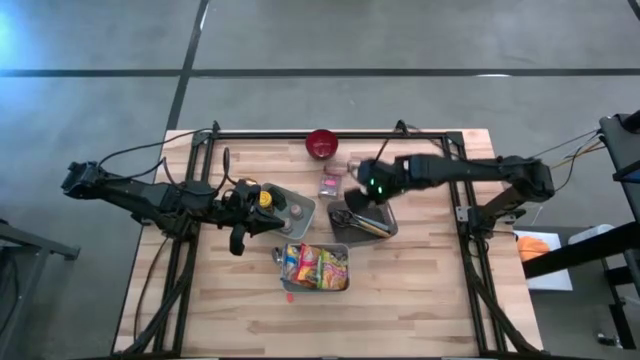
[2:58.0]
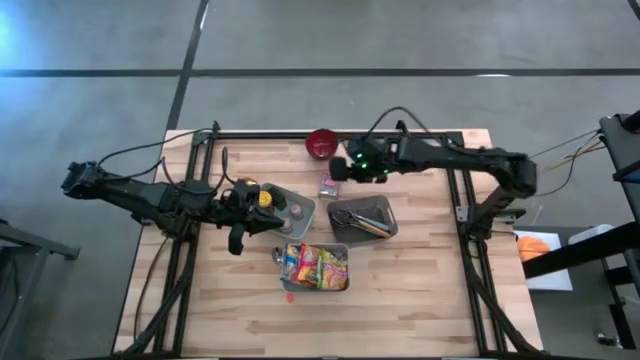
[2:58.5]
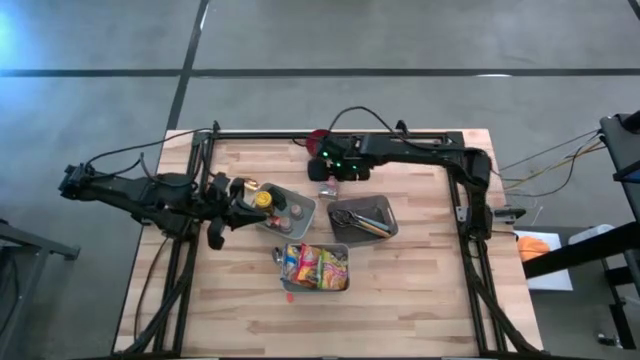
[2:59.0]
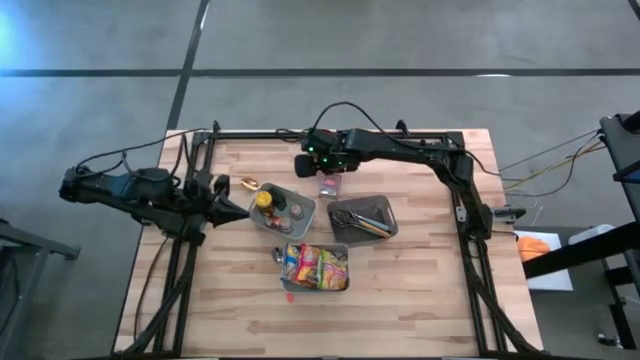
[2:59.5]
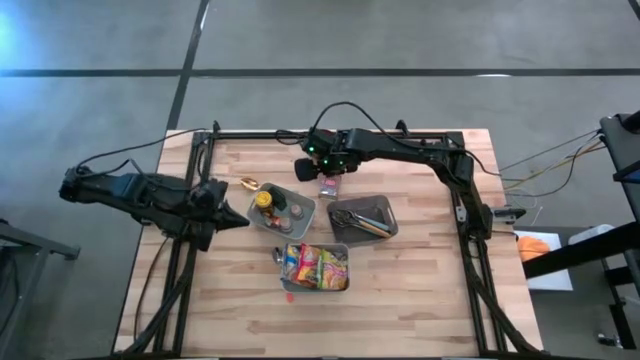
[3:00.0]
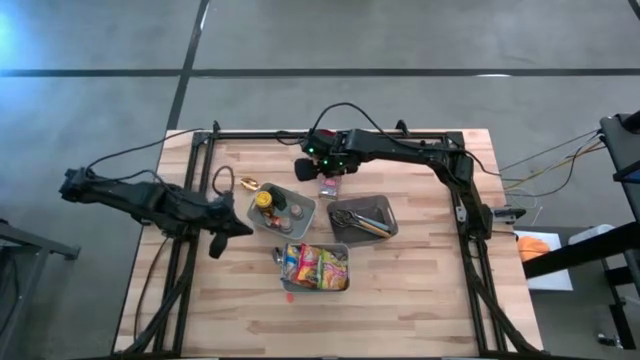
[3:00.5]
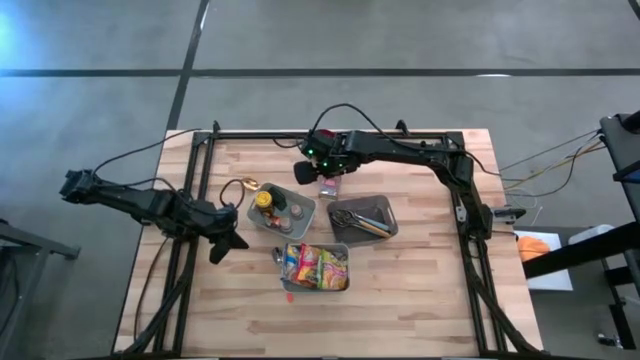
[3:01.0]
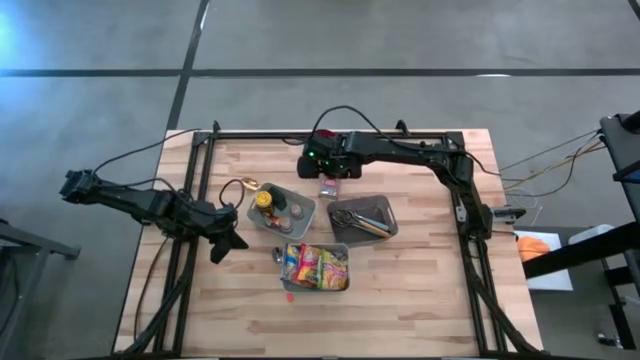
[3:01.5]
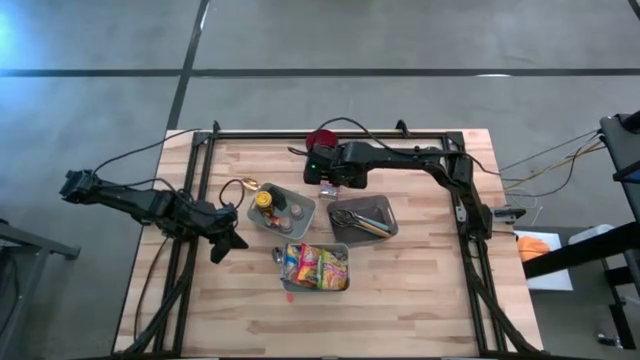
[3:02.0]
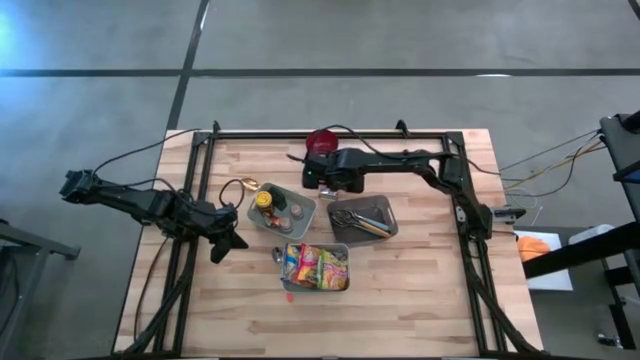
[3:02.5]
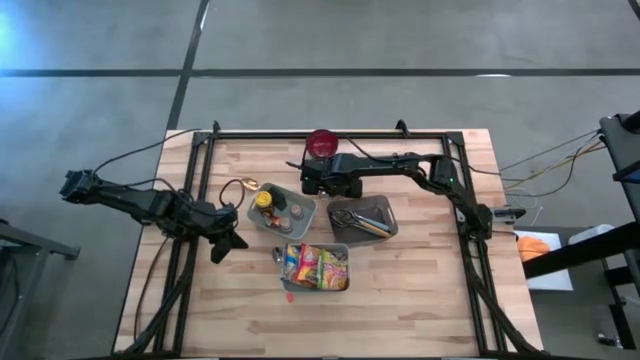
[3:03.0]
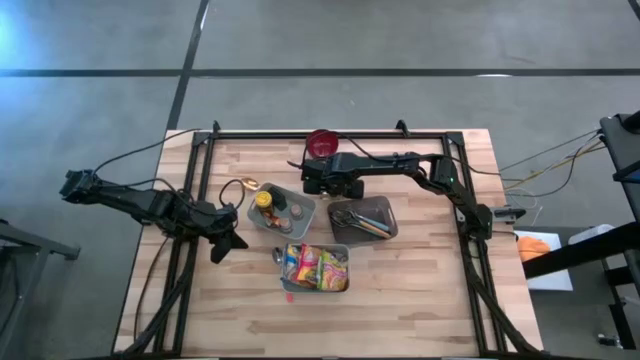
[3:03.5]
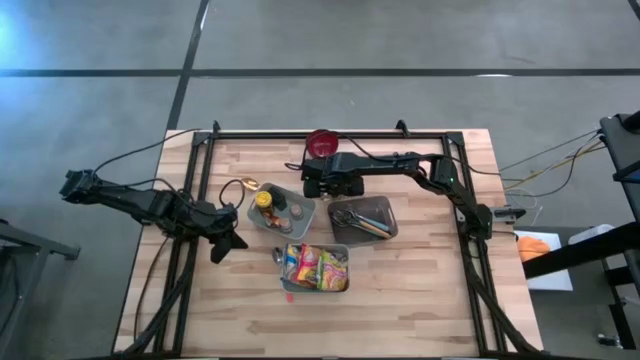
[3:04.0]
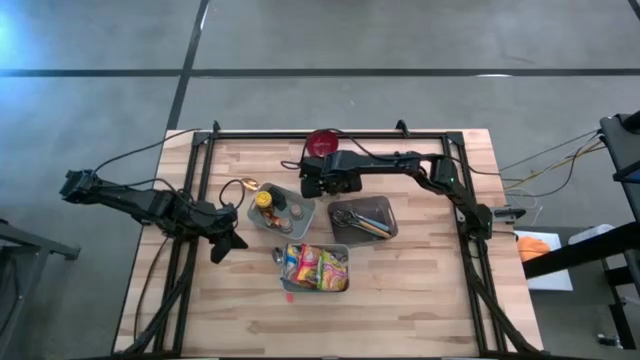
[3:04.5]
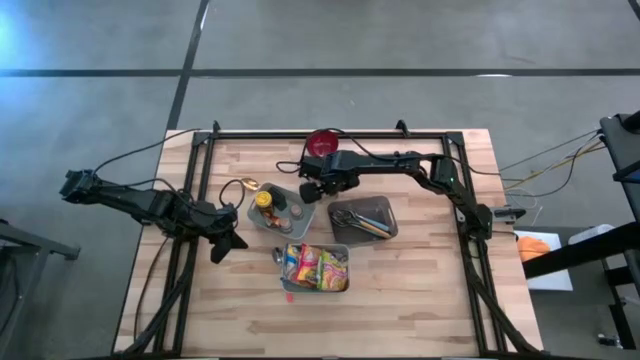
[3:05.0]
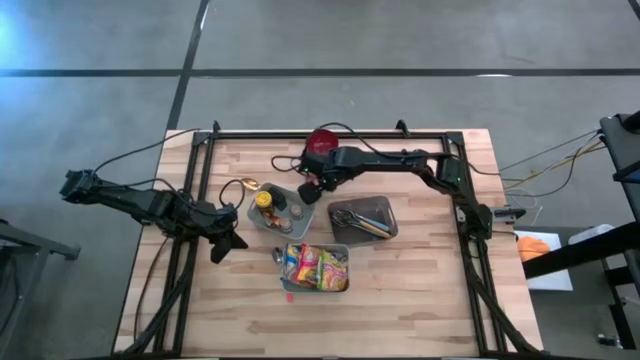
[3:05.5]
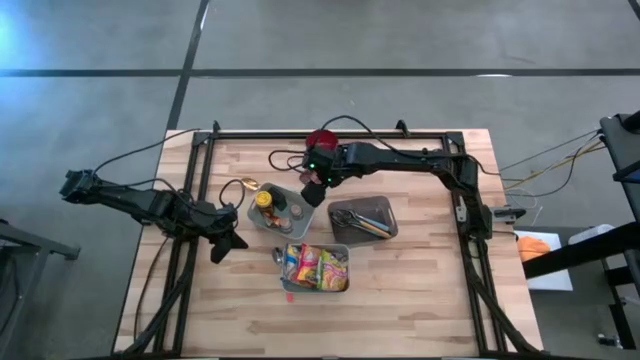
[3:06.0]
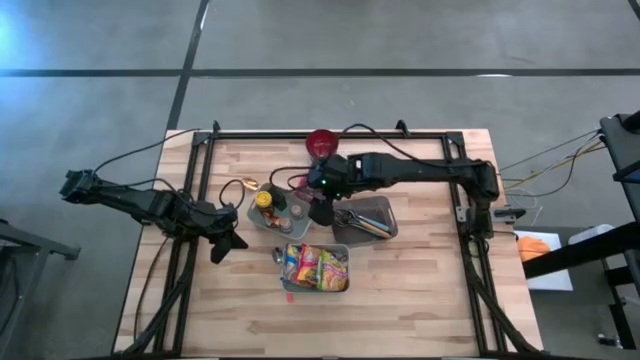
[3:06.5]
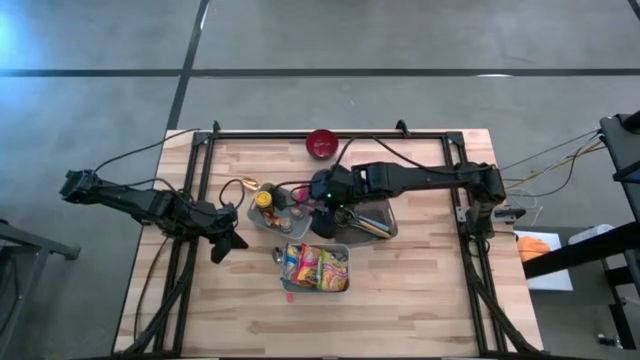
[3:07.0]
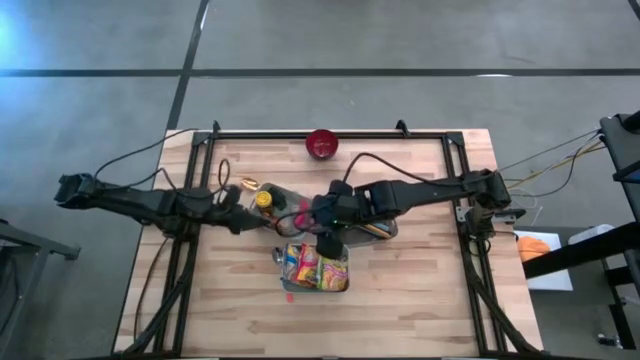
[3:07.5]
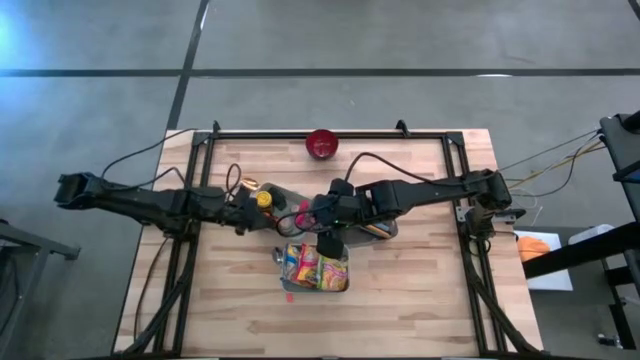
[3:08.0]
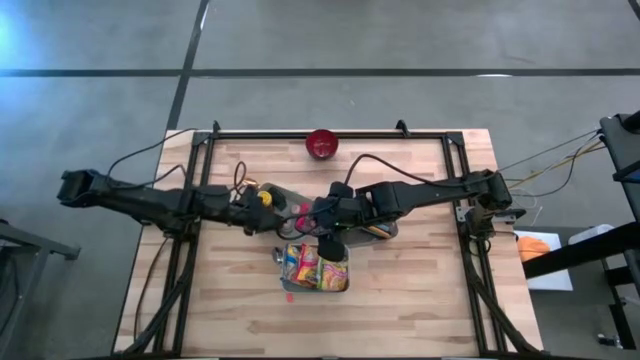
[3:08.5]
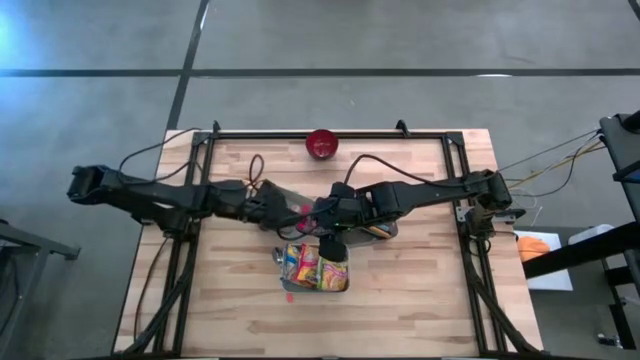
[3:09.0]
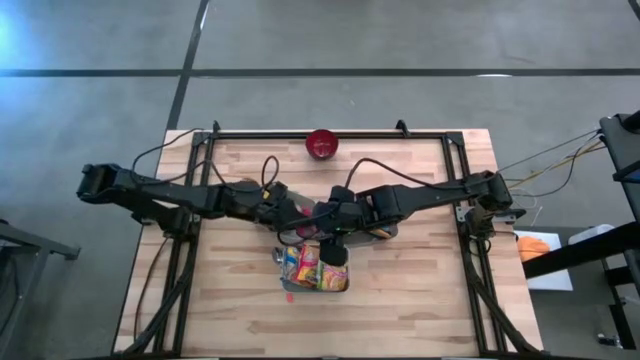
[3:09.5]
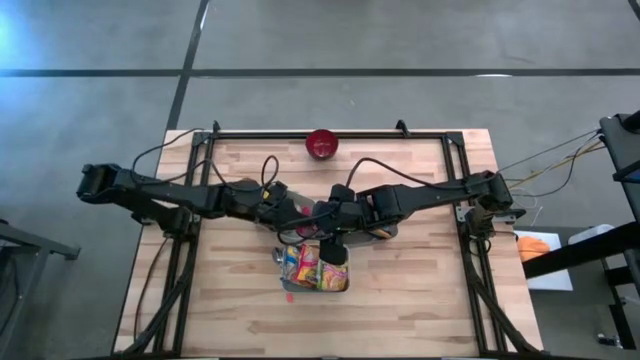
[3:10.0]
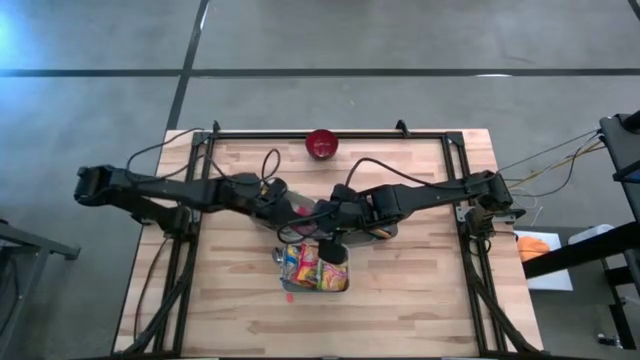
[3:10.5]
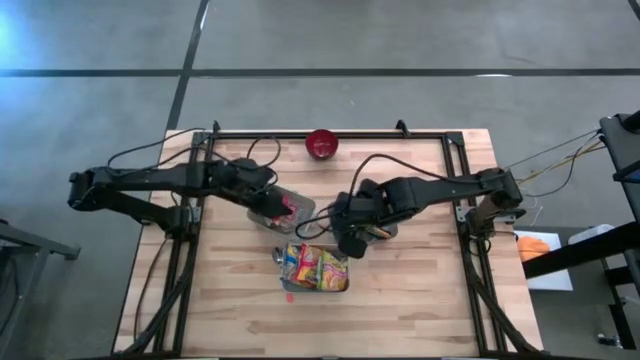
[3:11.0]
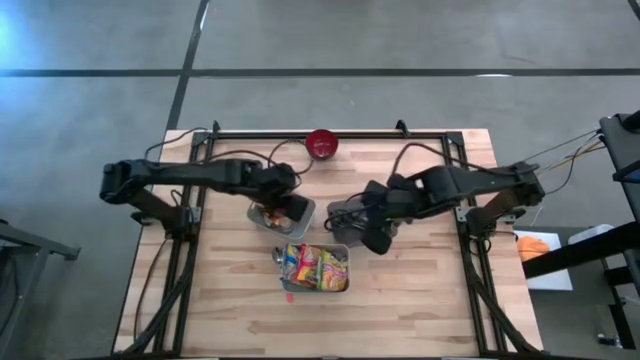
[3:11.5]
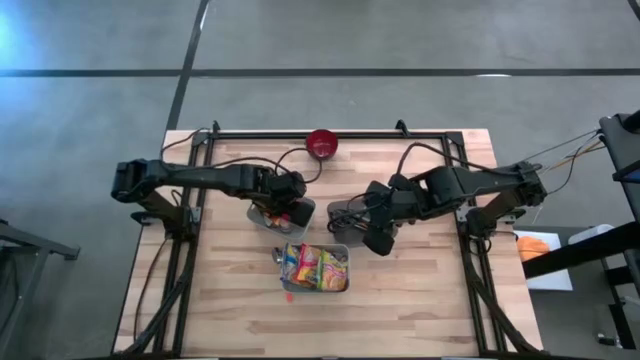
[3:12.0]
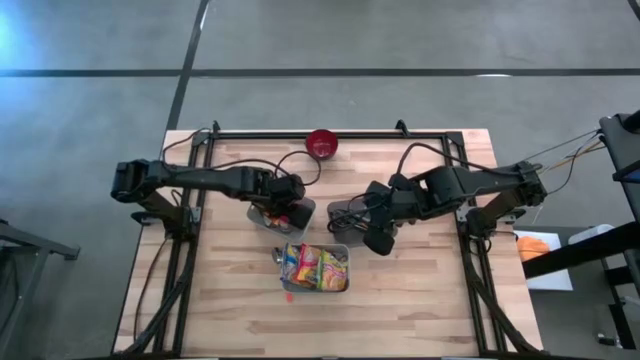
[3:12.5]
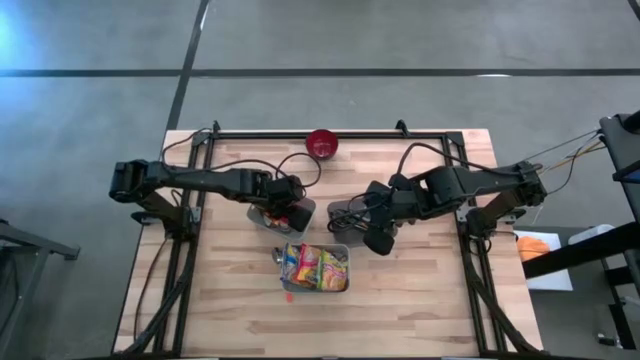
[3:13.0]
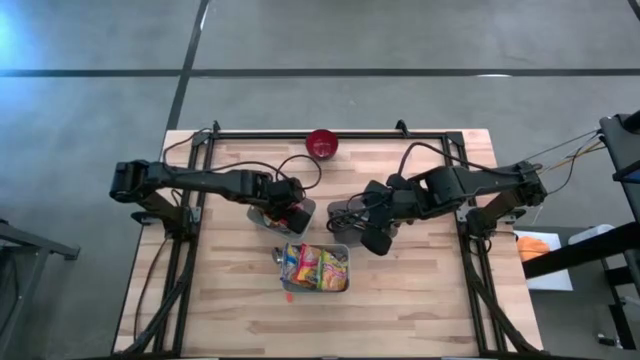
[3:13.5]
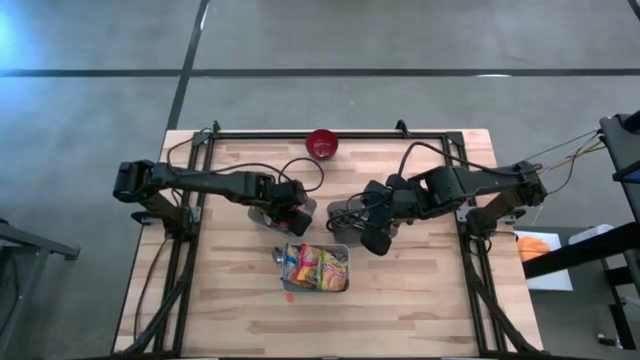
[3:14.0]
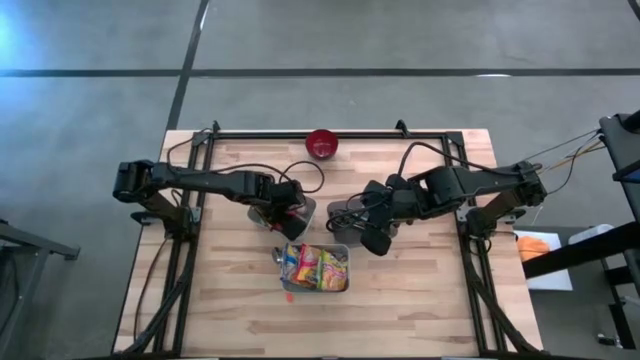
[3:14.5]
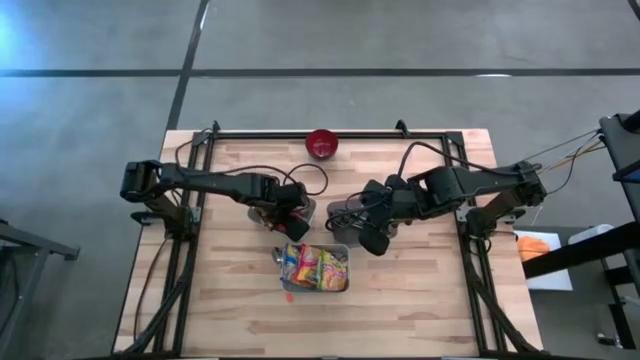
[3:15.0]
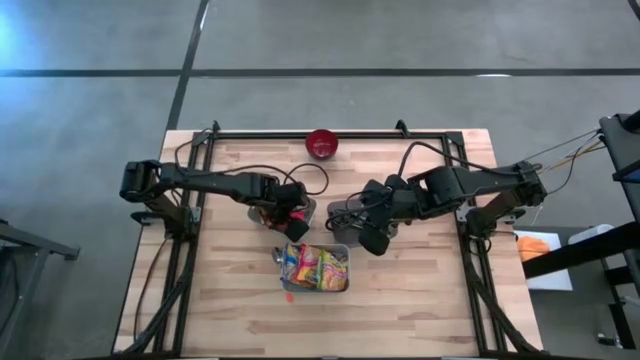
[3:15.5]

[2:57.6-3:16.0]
Put the red seasoning can into the top gray bin
